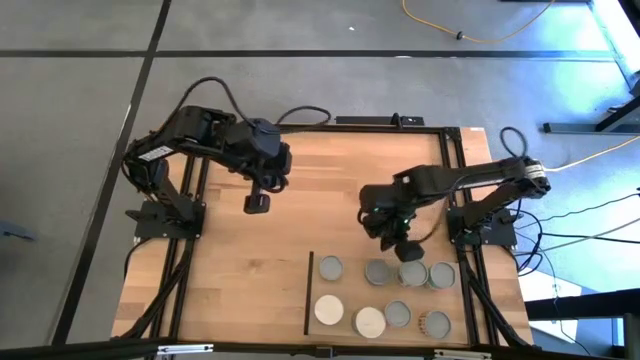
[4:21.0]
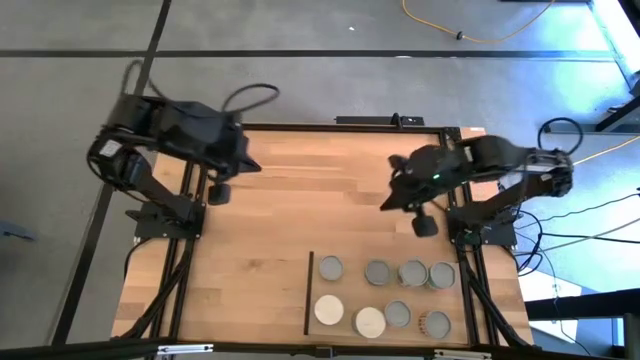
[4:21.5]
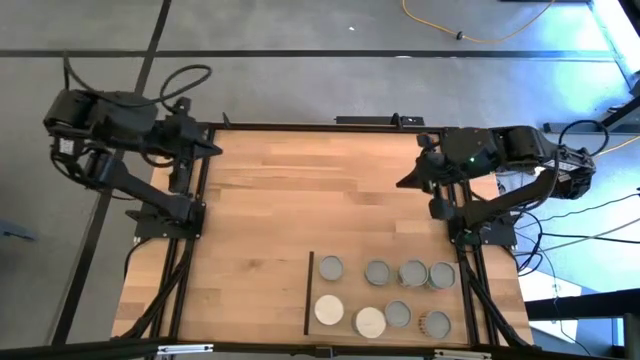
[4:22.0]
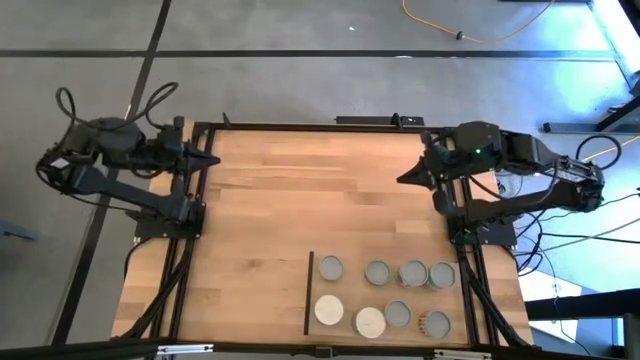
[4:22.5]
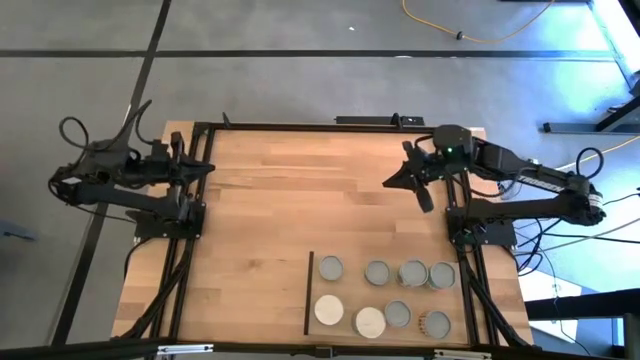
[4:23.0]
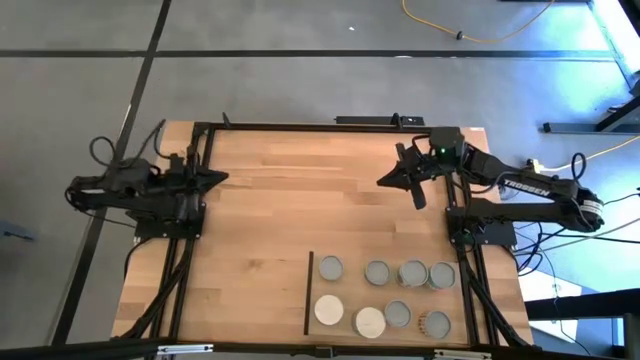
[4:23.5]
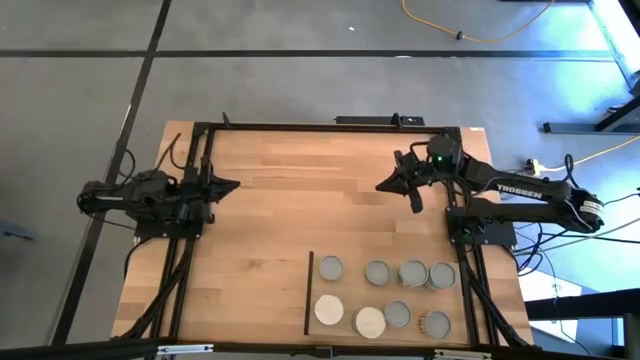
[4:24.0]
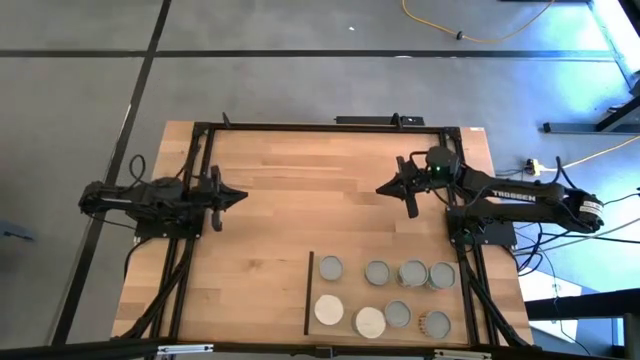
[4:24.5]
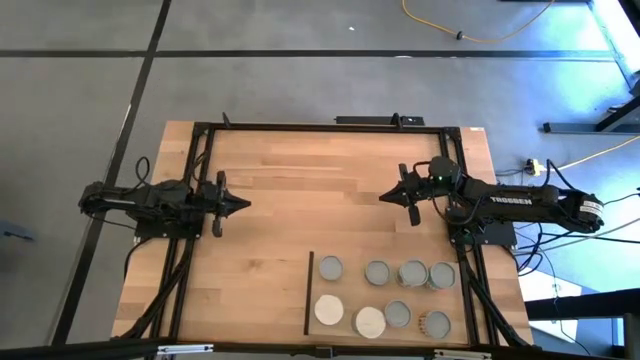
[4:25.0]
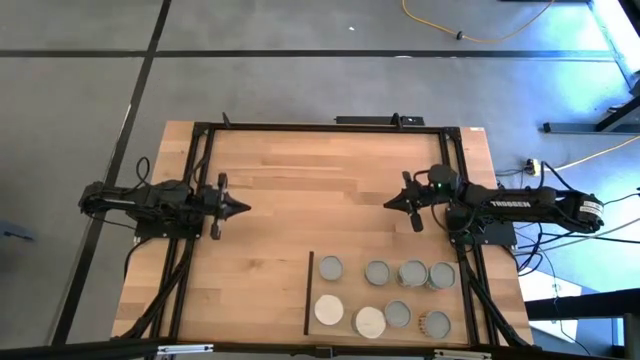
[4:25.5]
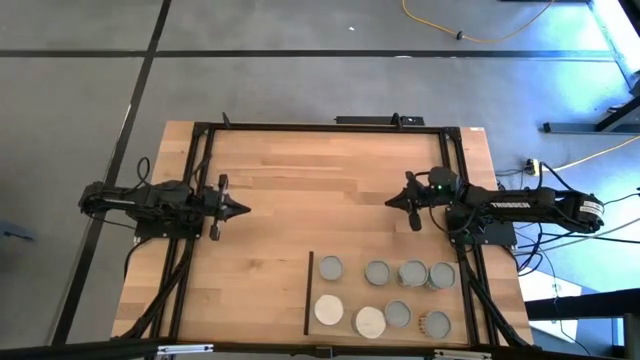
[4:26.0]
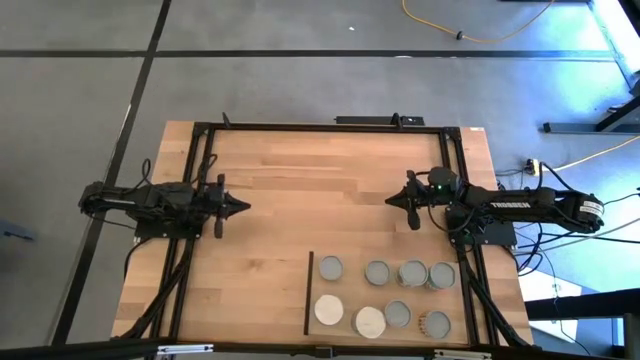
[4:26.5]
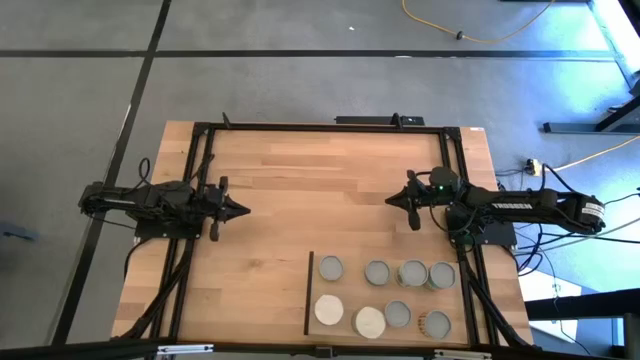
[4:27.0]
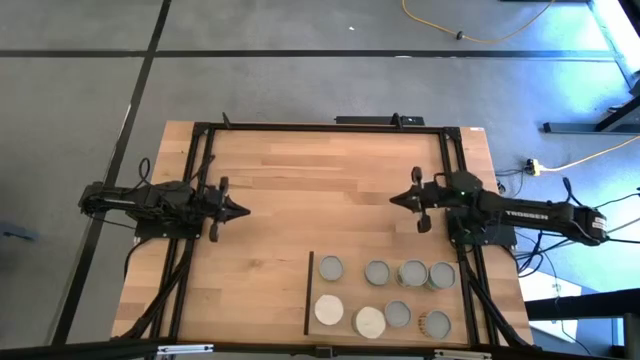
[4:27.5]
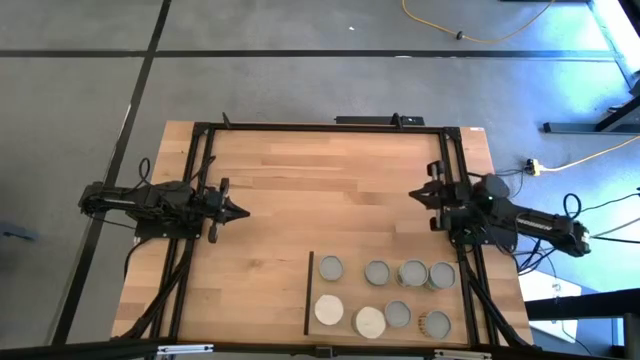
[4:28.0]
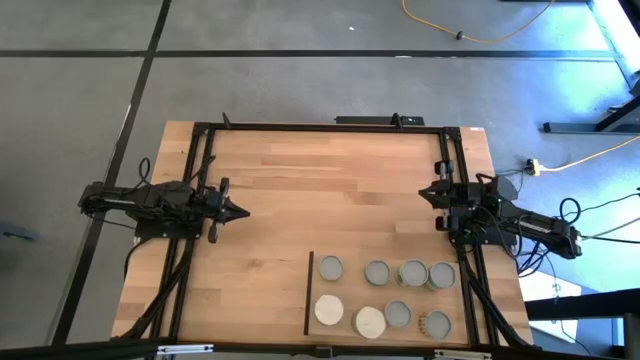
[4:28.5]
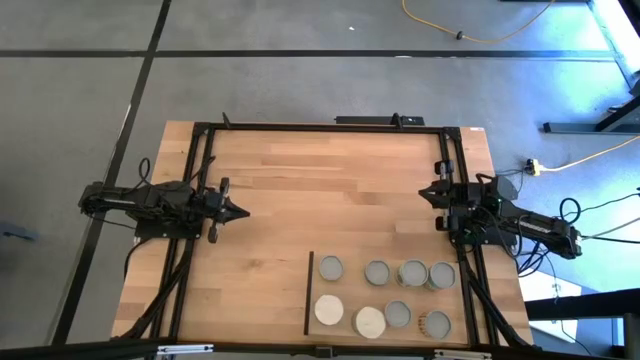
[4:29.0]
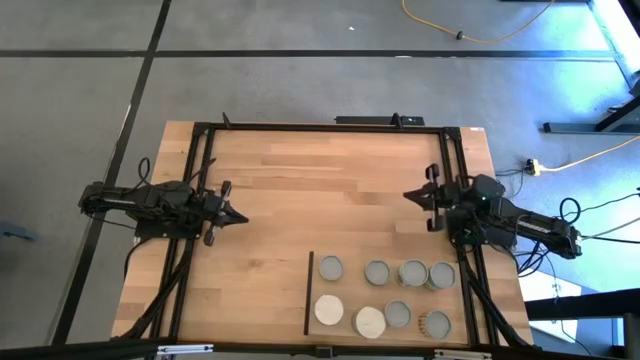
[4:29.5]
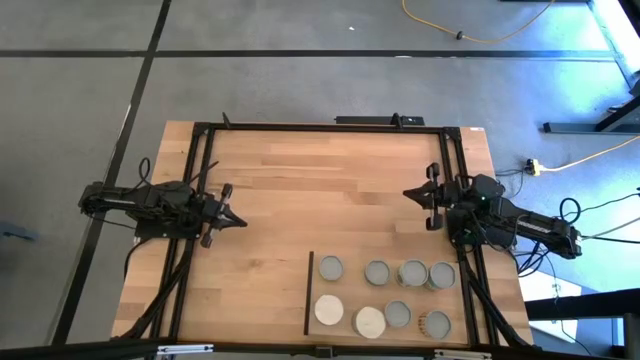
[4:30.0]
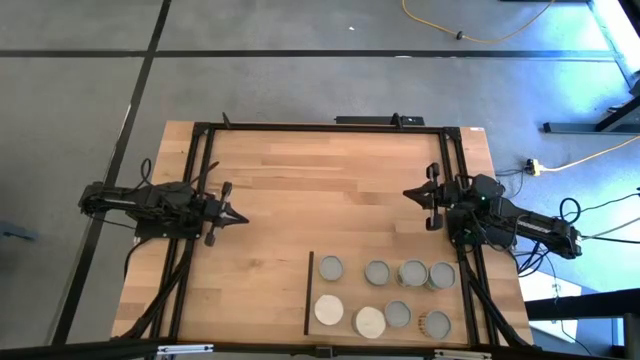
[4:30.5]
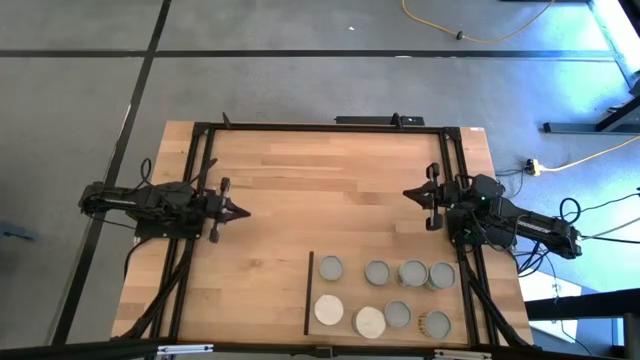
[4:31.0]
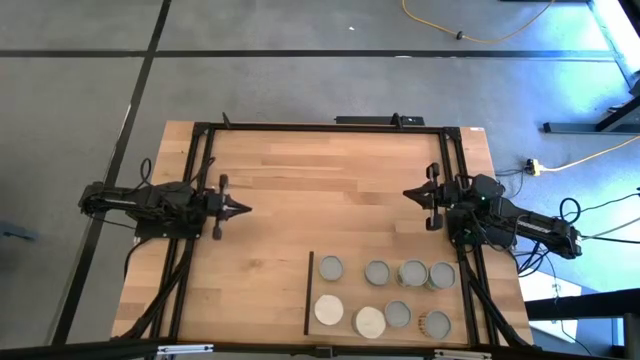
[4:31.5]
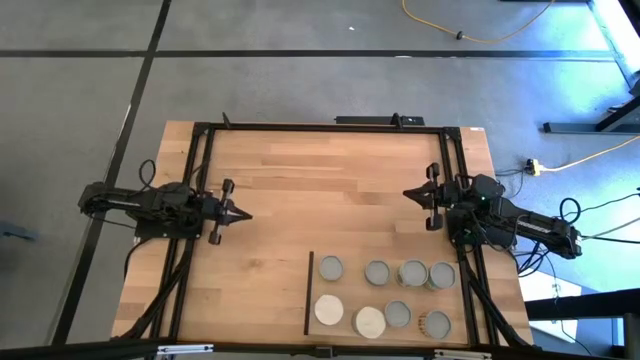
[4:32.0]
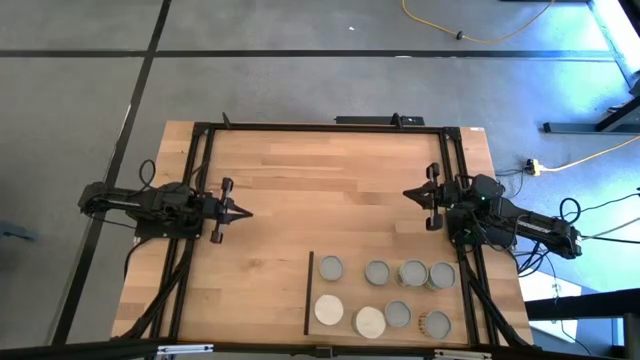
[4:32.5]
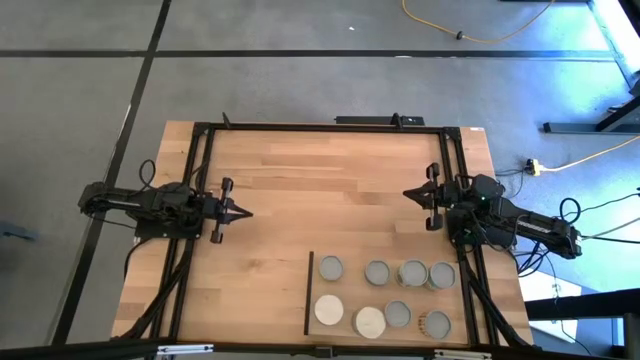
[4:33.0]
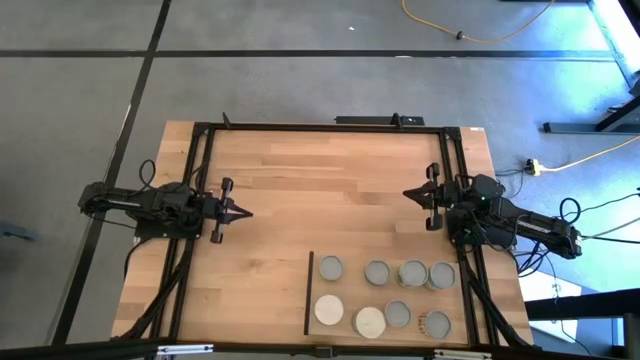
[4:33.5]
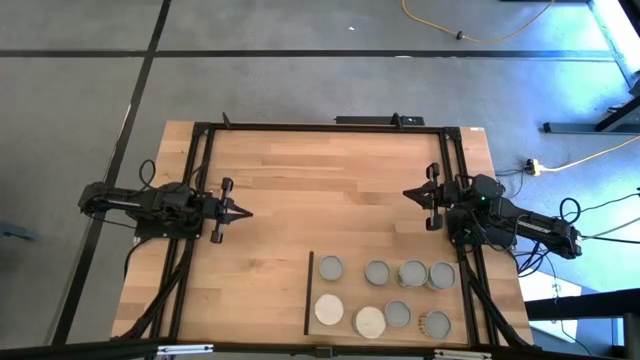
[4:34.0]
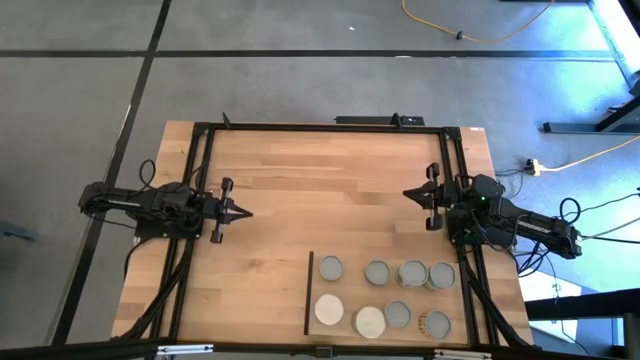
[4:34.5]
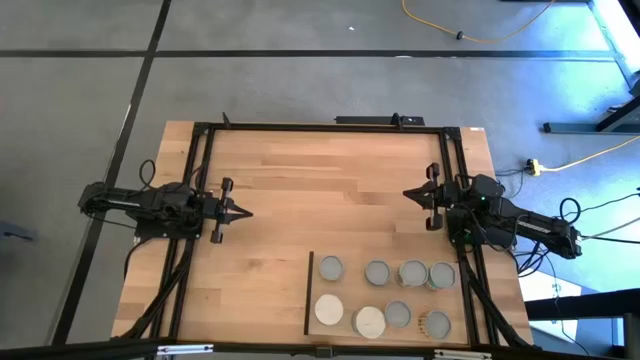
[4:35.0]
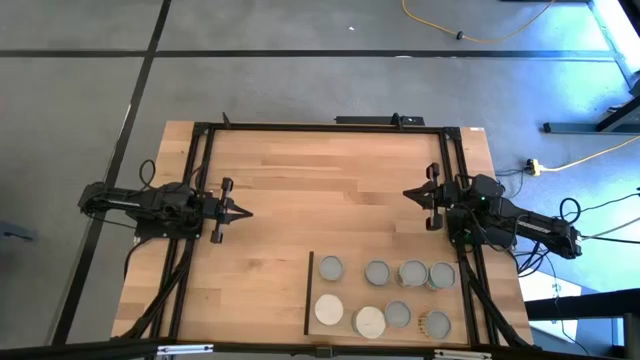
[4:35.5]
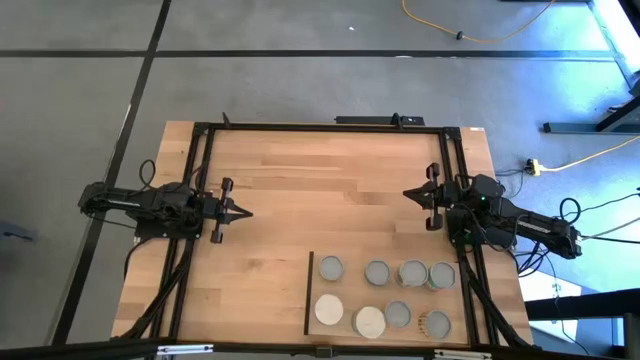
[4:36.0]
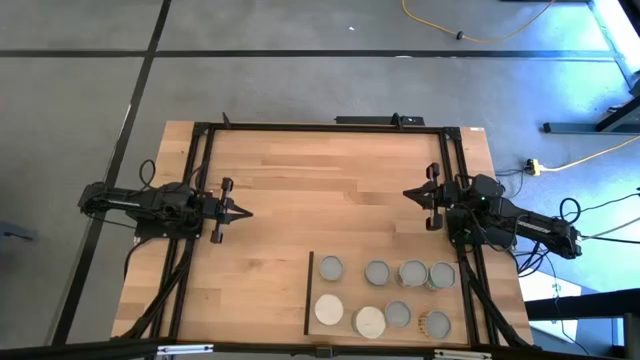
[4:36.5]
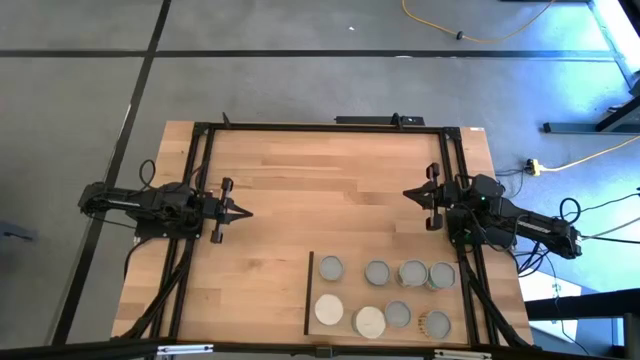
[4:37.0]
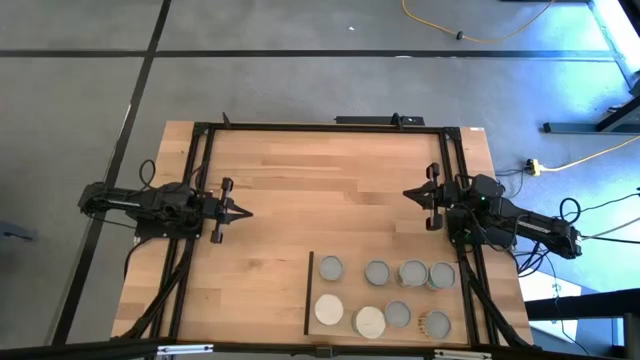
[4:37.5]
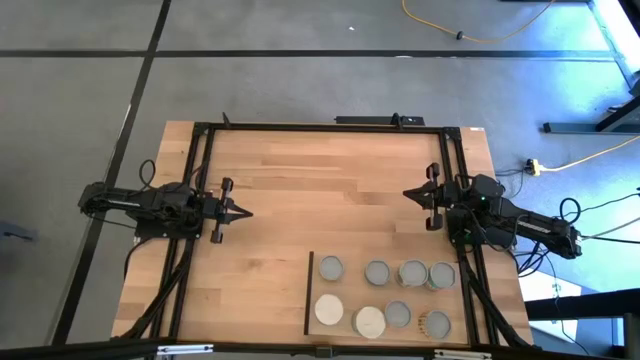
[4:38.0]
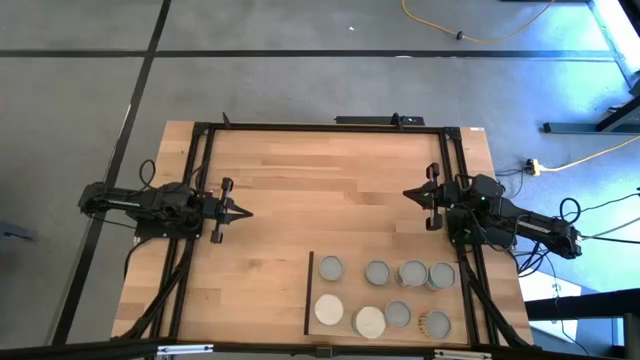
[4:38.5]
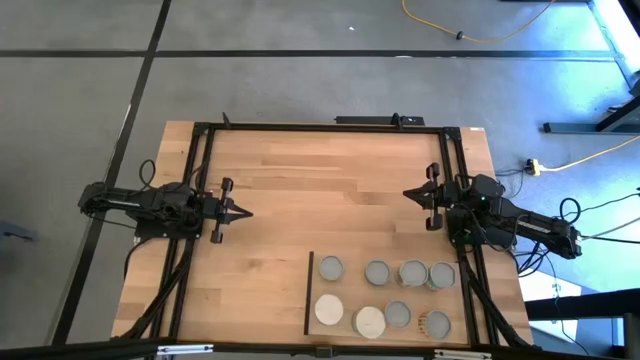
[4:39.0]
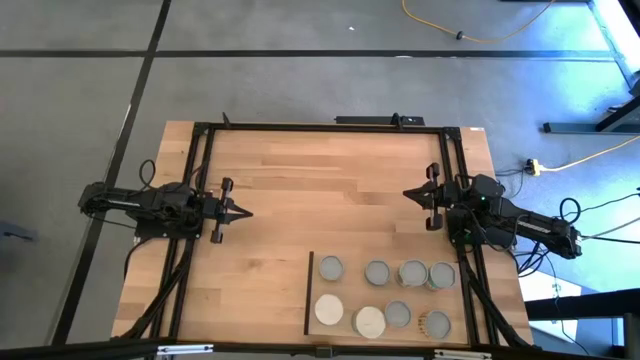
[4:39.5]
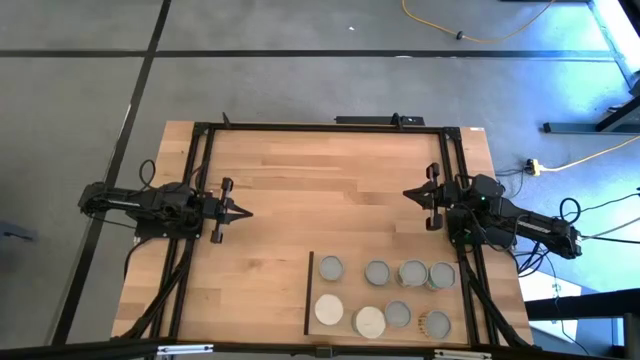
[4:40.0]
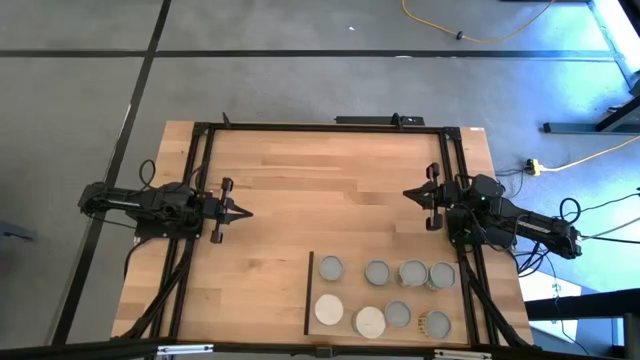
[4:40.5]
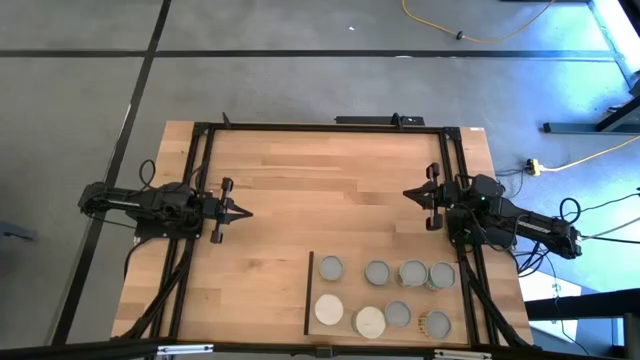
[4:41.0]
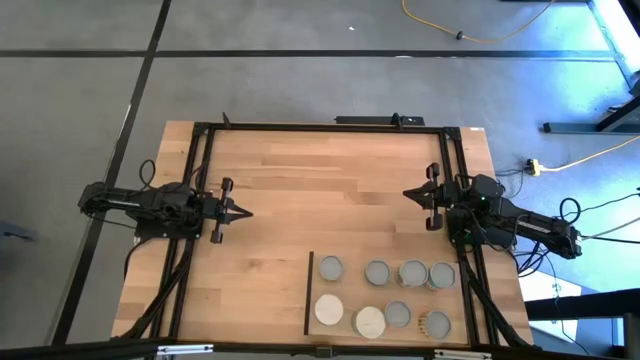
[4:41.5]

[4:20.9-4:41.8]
Task: Pick and place cans onto a shelf
Return to Home Position
